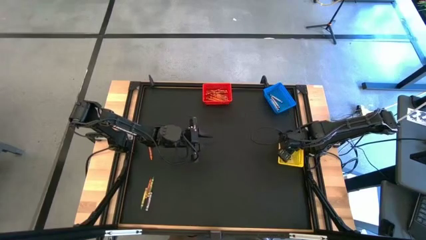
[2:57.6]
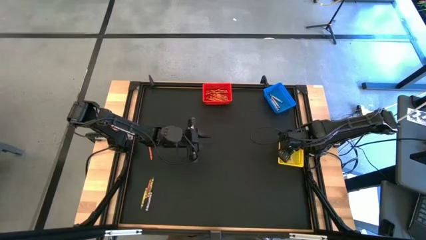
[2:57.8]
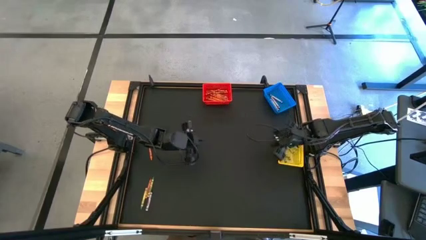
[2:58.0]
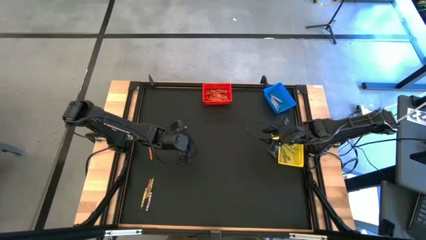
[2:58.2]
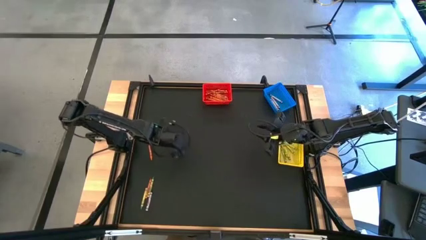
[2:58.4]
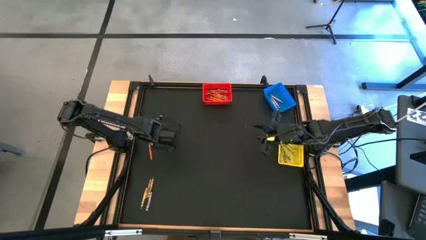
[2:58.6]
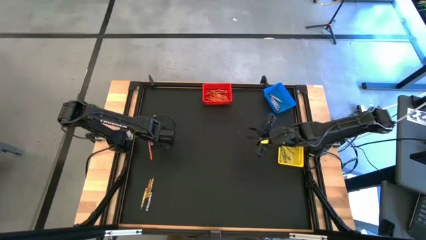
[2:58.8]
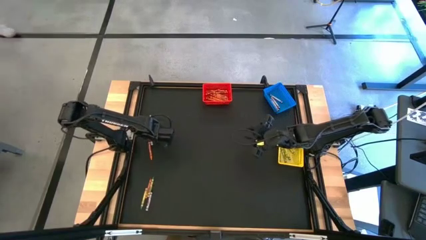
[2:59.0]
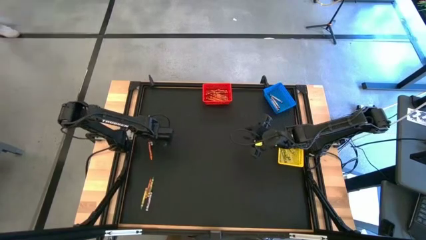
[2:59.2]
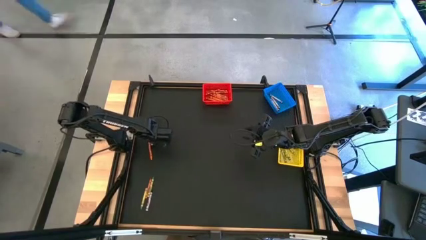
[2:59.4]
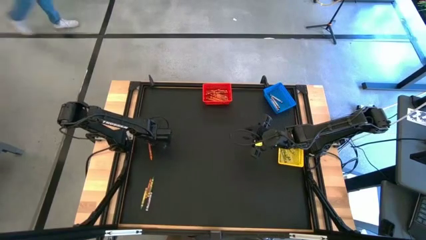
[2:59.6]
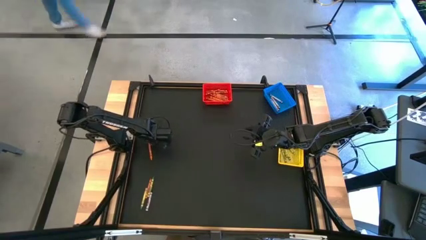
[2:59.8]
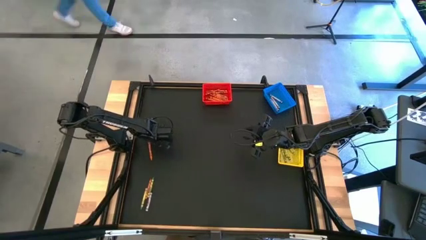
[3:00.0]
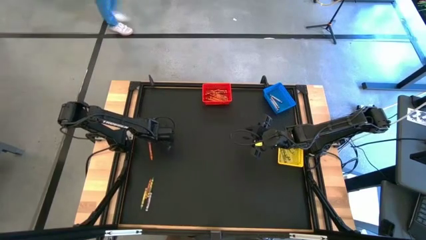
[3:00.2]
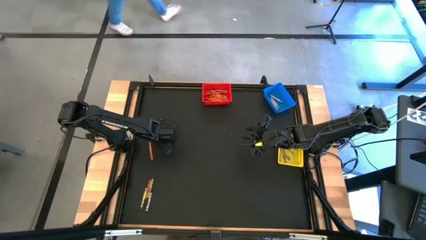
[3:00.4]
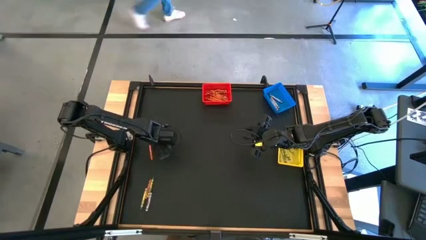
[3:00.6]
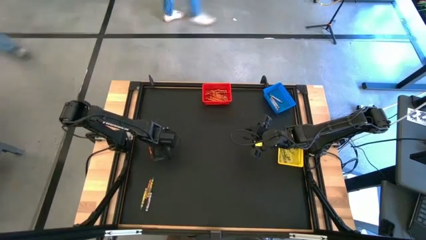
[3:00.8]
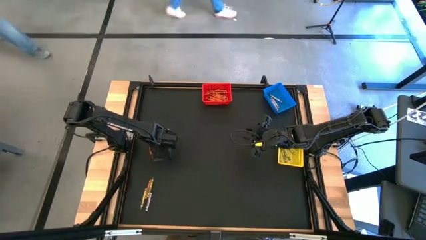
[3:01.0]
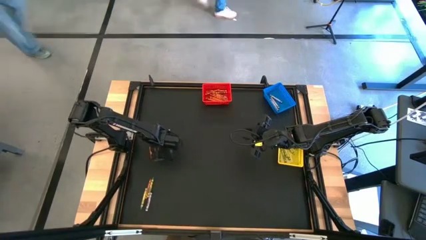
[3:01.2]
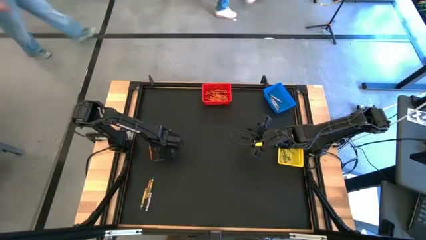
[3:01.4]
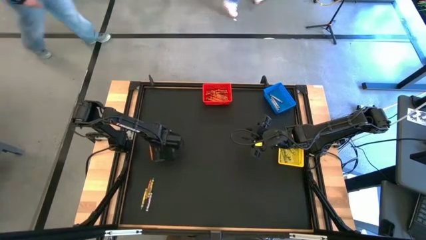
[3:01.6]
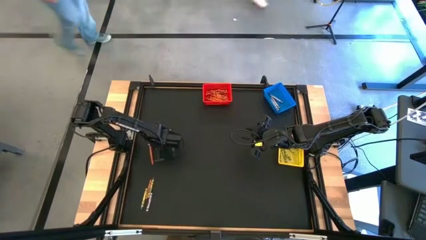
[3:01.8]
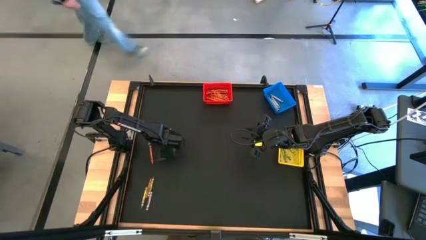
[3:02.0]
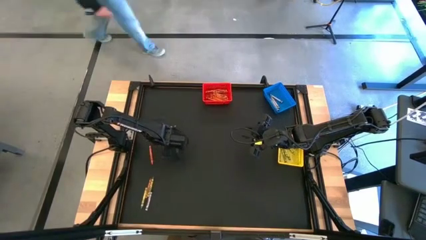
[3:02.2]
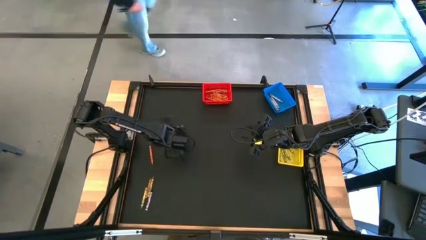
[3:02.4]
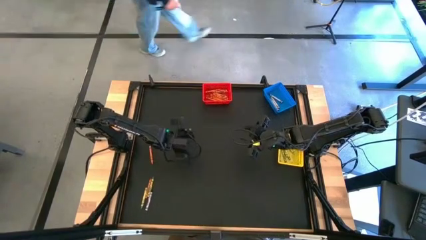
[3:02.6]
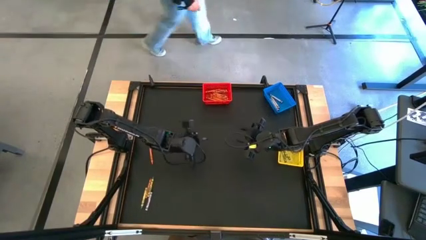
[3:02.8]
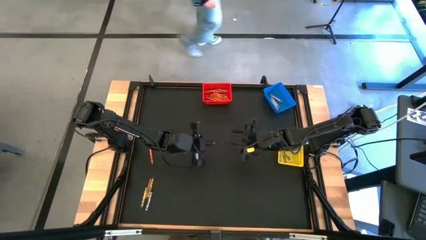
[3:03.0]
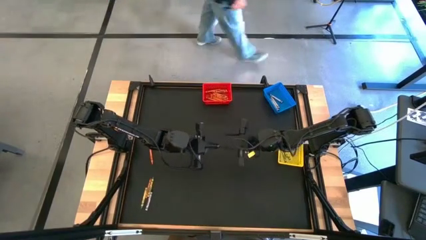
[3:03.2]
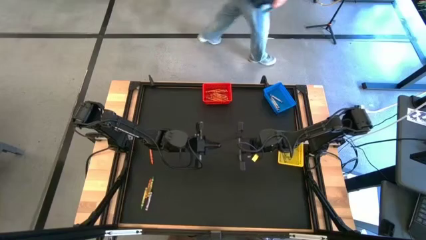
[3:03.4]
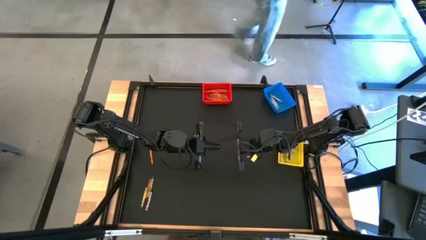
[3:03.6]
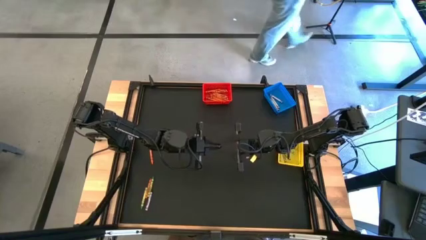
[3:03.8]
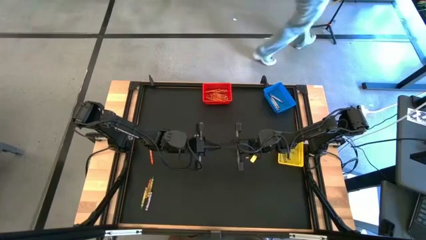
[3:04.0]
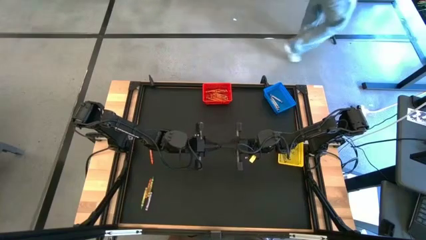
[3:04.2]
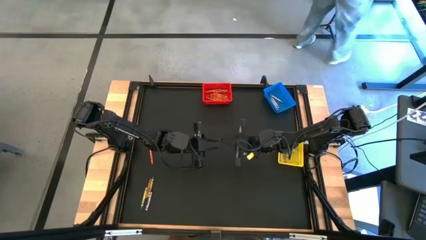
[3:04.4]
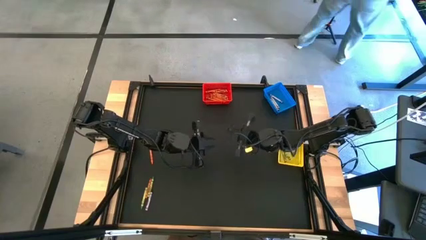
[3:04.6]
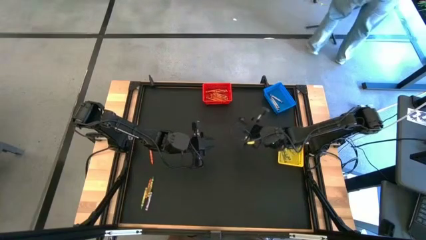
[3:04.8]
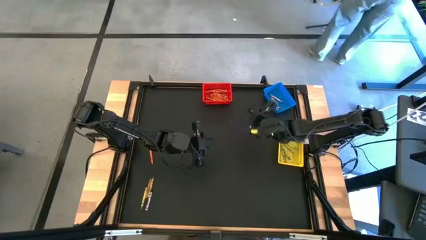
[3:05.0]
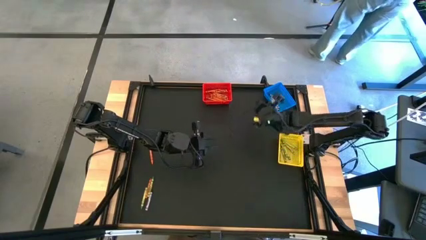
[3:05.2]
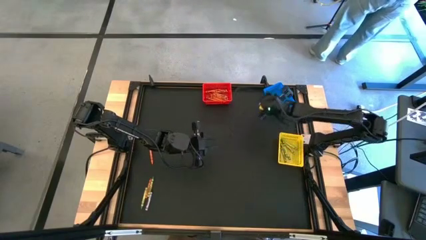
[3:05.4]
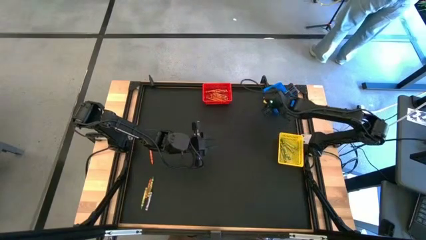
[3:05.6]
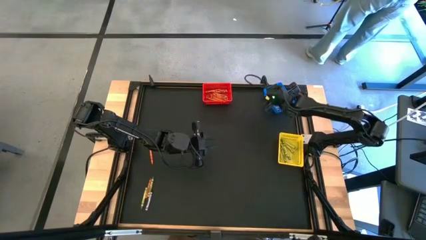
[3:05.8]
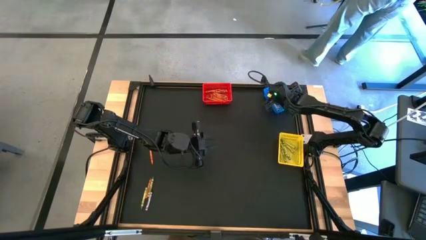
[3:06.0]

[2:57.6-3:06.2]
Task: Sort crayons
Put the black crayon into the blue bin

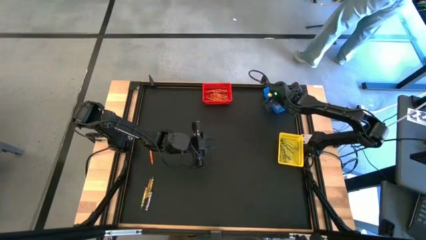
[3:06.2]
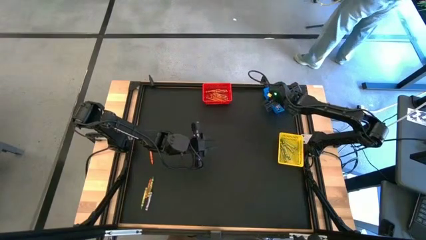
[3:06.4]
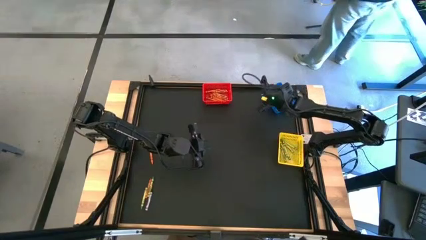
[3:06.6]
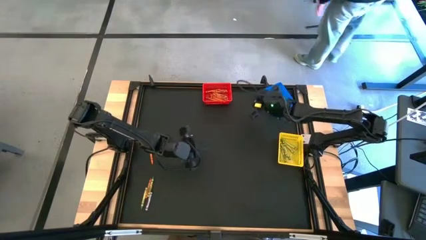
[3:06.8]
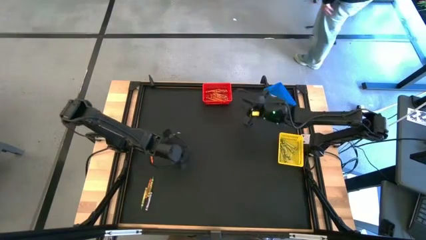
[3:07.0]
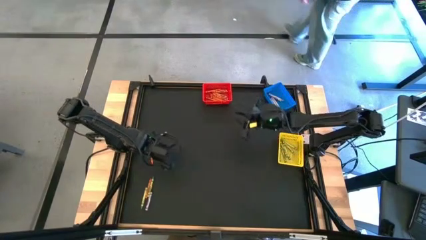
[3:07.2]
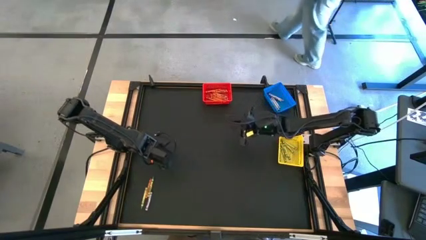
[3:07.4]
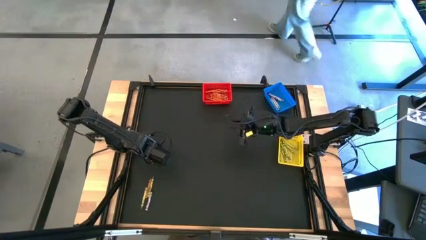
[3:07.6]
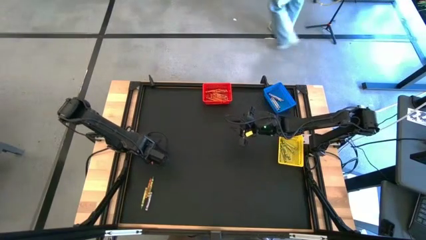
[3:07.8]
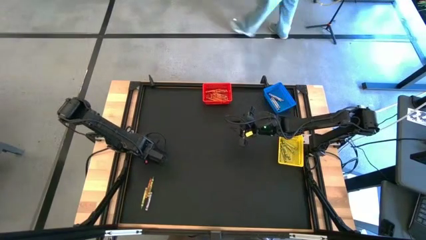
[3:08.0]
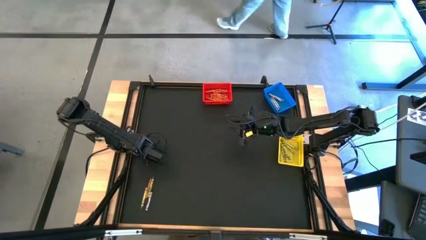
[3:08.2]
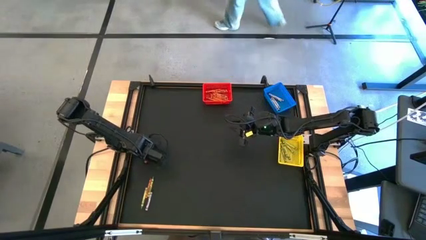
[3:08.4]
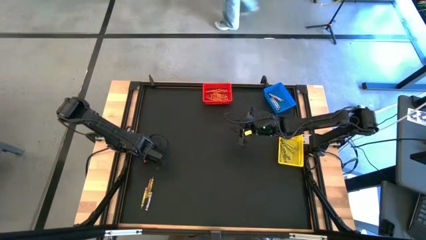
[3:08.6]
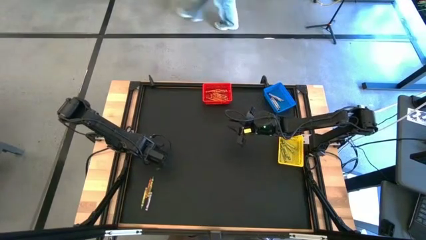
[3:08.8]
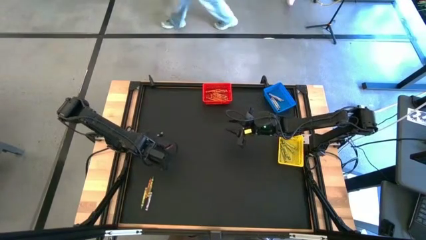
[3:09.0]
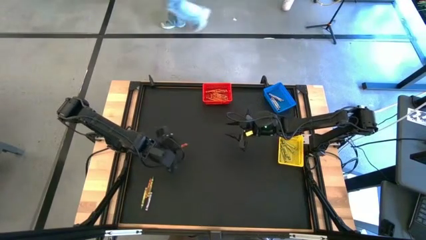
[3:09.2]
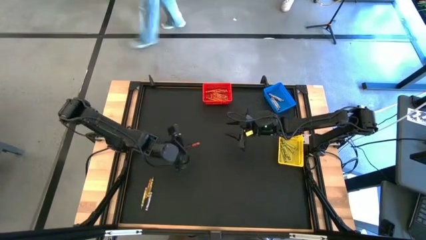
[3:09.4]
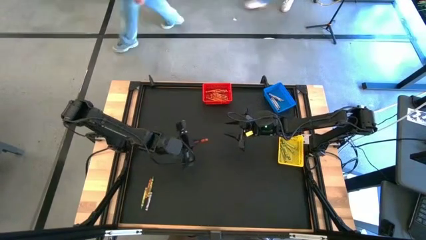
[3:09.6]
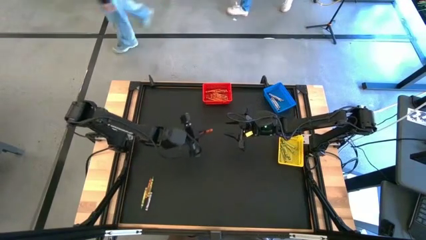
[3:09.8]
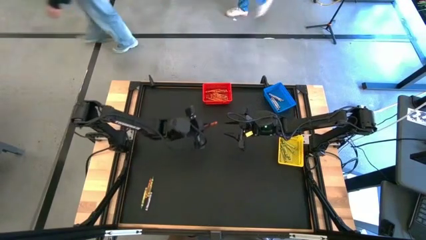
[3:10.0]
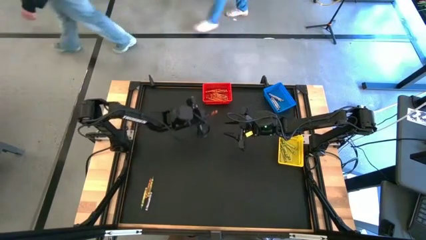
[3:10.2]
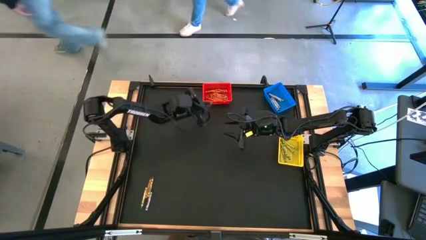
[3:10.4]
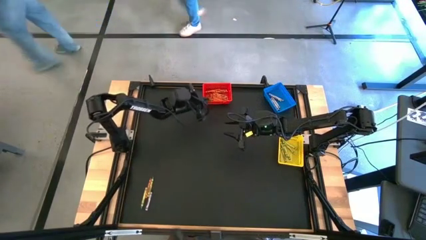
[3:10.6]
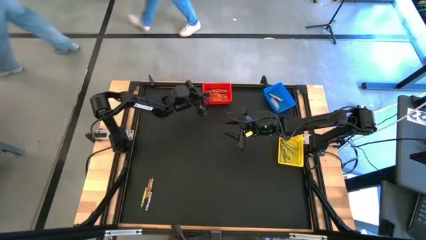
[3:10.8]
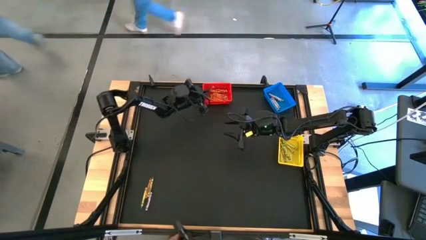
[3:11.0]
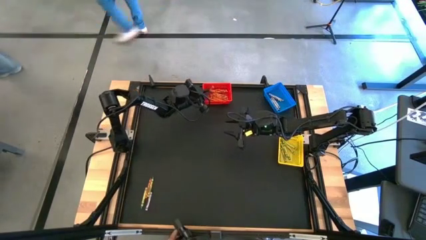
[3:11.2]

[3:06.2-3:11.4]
Put the orange crayon into the red bin

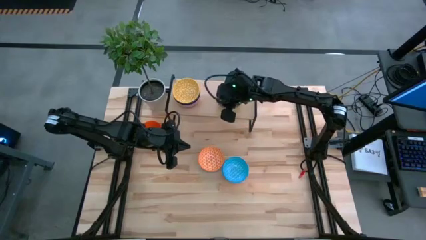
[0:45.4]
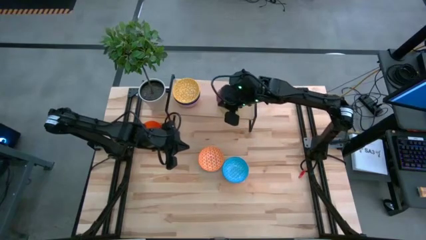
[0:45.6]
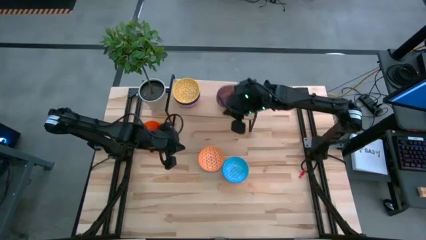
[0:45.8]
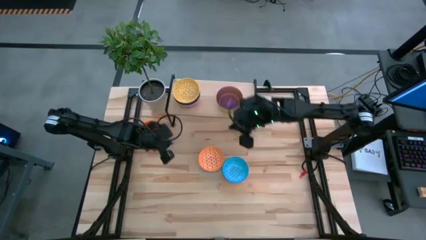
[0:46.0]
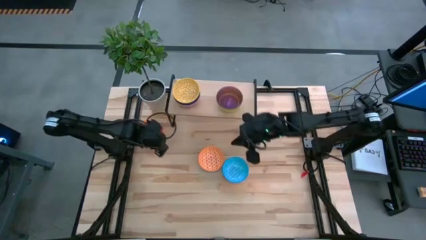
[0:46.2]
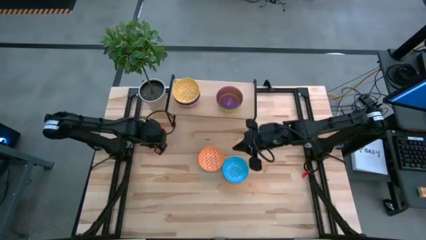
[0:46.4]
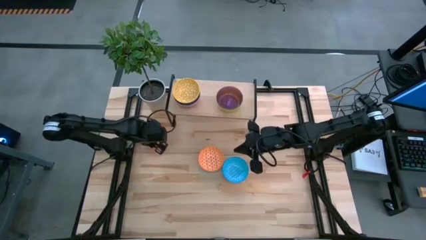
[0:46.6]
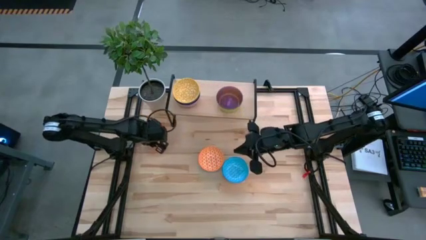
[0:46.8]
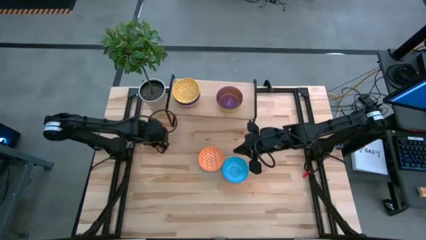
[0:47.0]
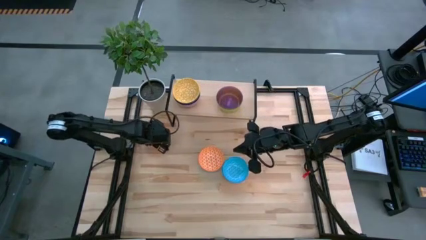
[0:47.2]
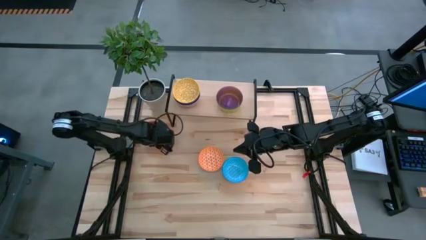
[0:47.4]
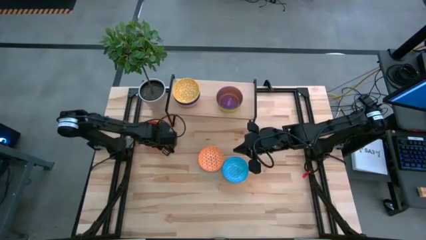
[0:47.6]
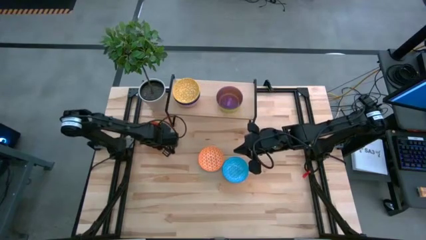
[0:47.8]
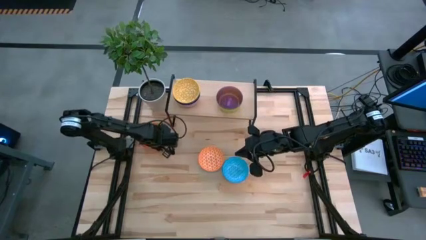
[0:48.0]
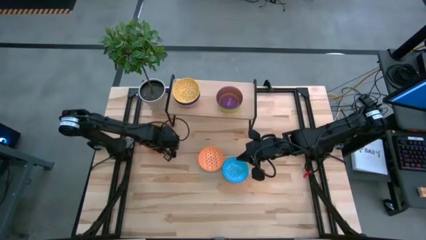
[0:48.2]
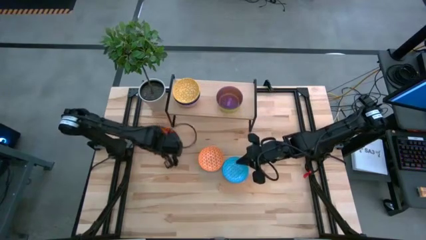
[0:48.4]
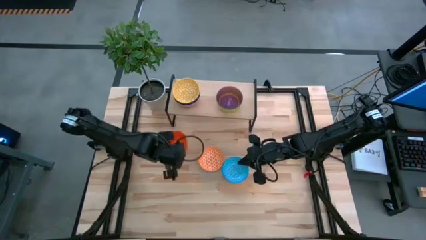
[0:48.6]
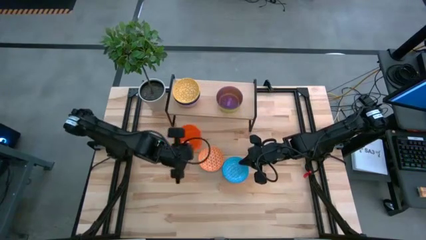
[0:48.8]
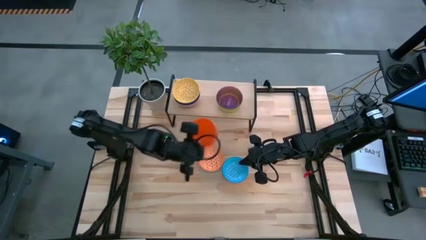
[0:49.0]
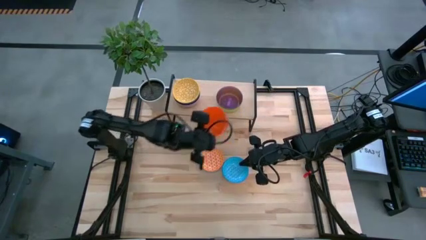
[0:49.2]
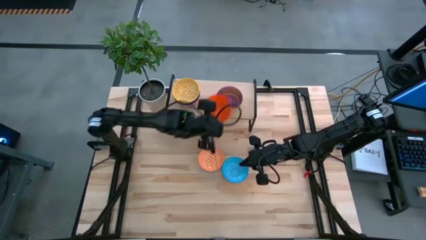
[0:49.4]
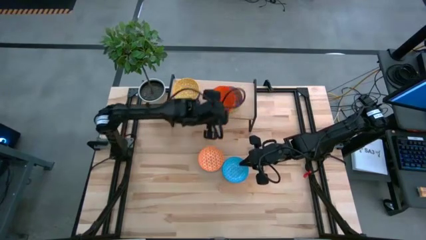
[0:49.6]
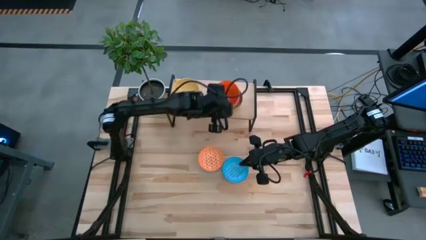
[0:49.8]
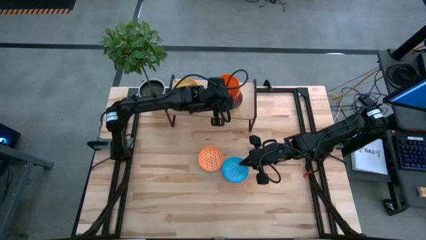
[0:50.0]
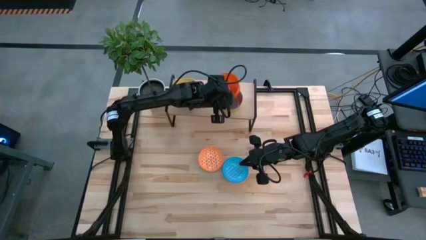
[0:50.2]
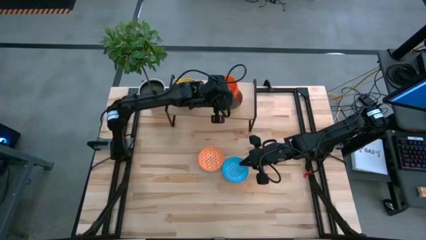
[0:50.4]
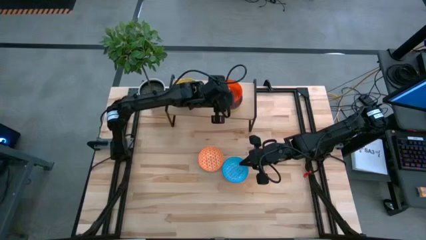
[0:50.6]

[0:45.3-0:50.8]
Task: Place and stack bowls onto a shelf
Stack the orange bowl into the purple bowl on the shelf
